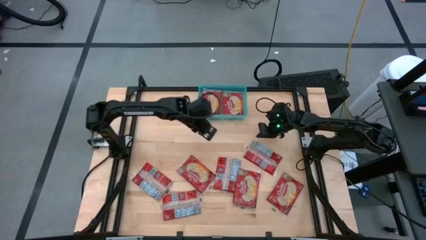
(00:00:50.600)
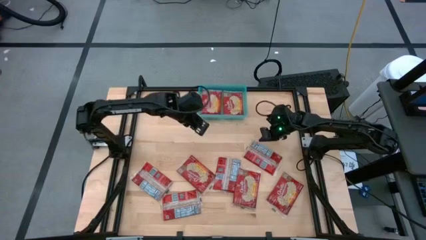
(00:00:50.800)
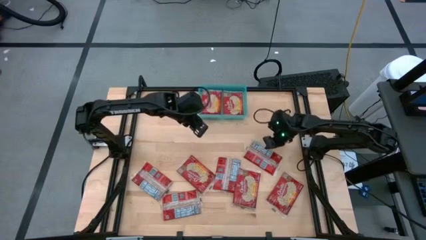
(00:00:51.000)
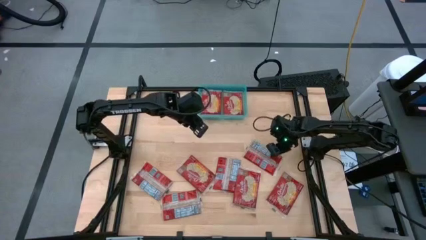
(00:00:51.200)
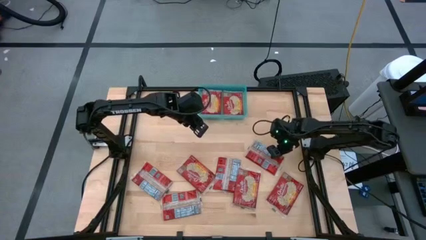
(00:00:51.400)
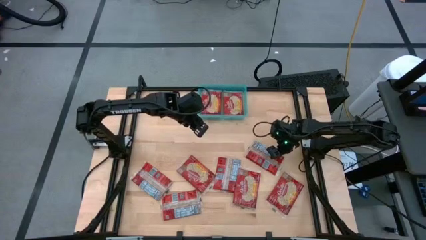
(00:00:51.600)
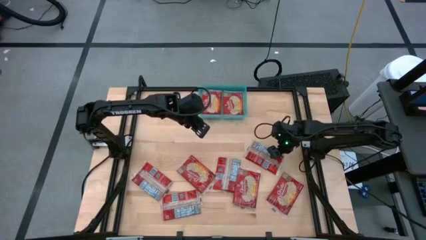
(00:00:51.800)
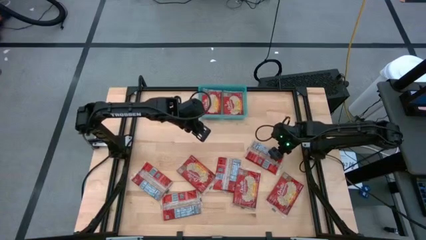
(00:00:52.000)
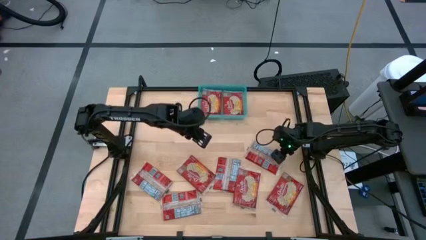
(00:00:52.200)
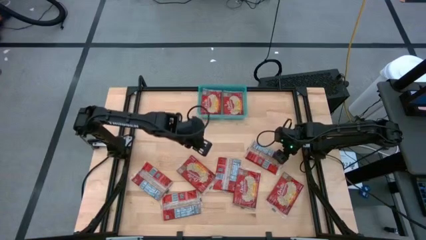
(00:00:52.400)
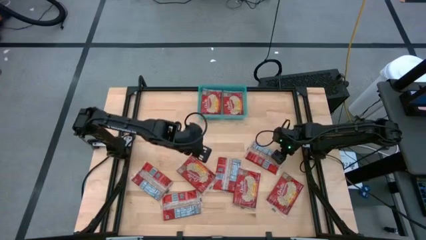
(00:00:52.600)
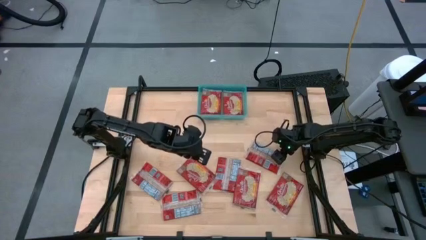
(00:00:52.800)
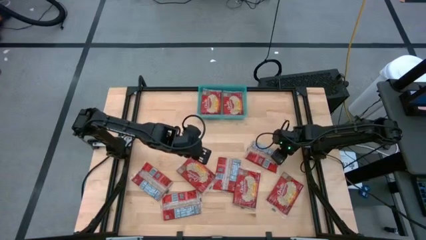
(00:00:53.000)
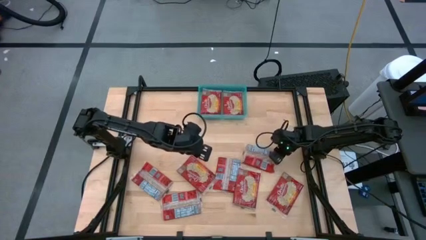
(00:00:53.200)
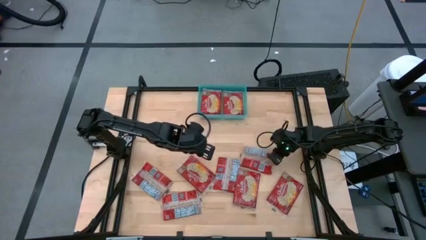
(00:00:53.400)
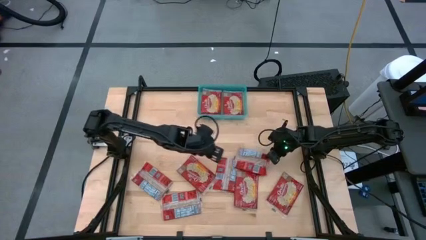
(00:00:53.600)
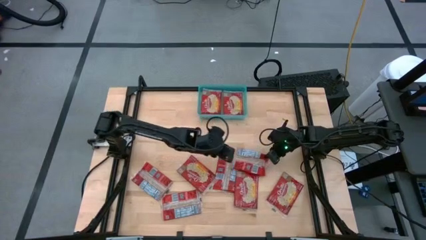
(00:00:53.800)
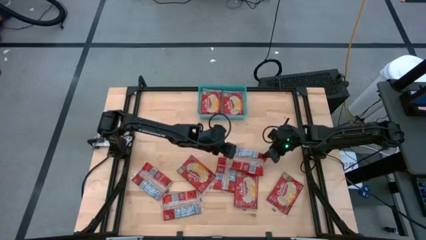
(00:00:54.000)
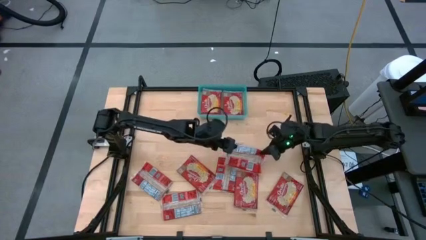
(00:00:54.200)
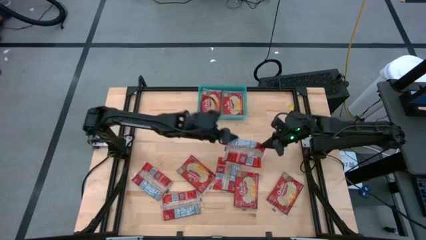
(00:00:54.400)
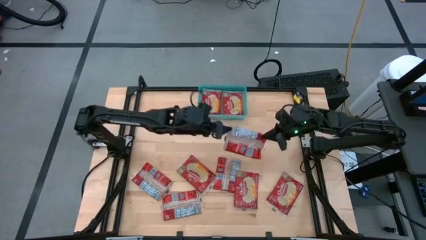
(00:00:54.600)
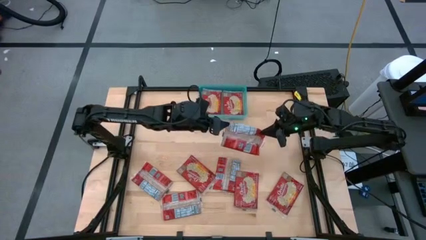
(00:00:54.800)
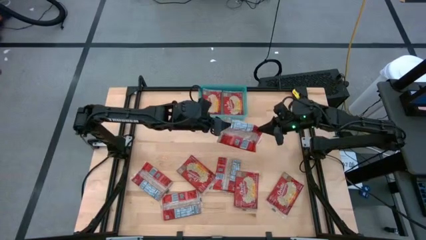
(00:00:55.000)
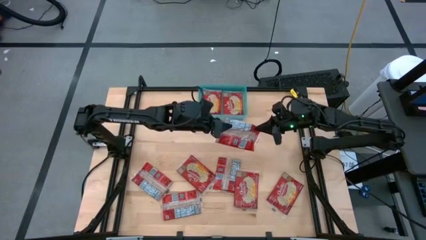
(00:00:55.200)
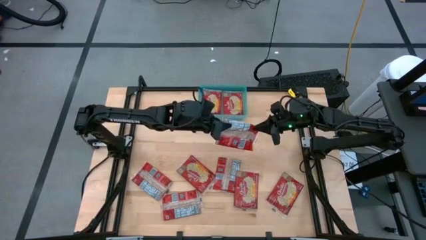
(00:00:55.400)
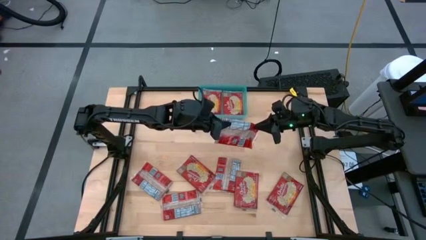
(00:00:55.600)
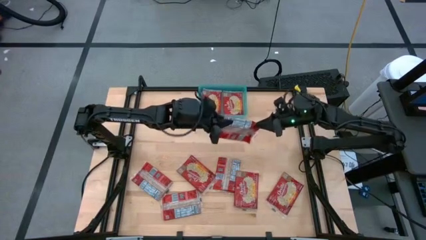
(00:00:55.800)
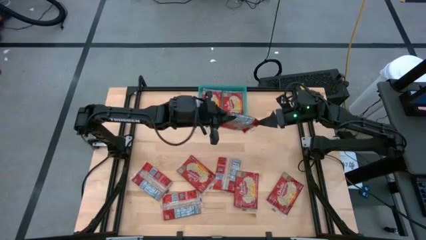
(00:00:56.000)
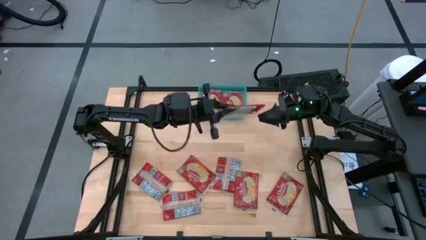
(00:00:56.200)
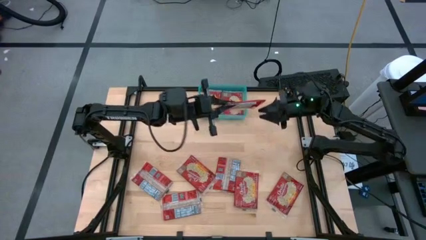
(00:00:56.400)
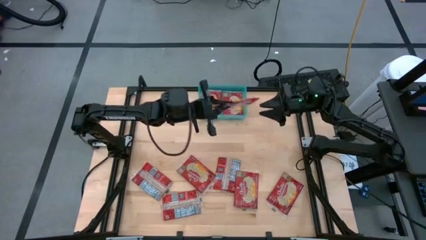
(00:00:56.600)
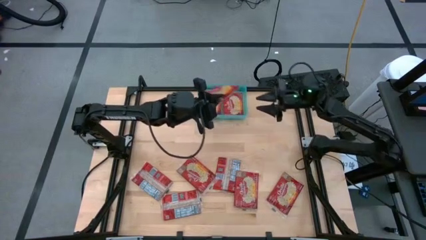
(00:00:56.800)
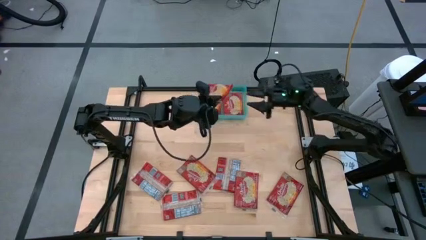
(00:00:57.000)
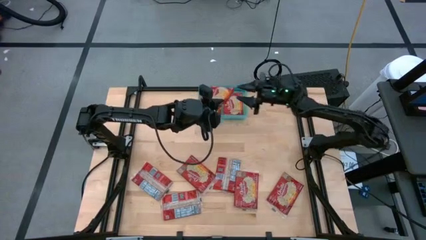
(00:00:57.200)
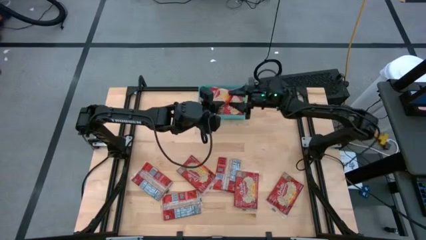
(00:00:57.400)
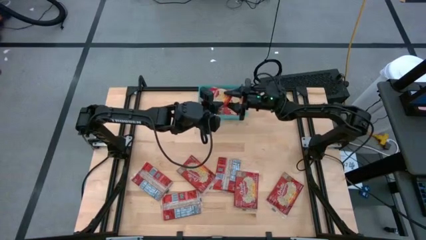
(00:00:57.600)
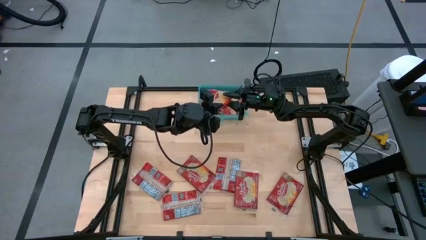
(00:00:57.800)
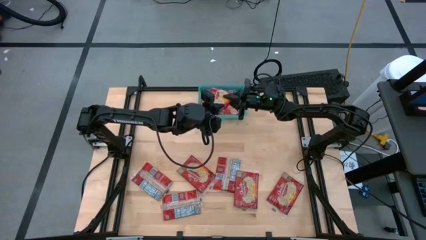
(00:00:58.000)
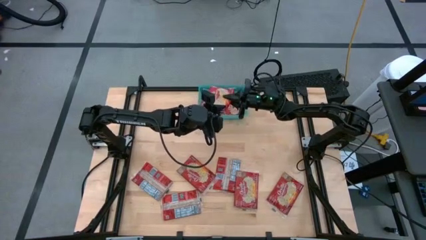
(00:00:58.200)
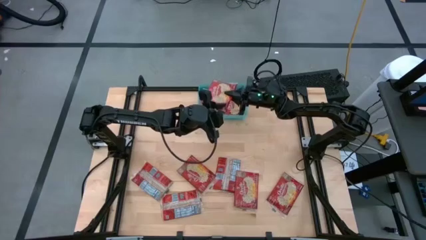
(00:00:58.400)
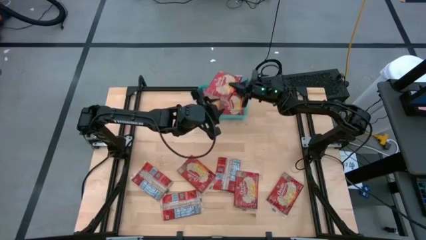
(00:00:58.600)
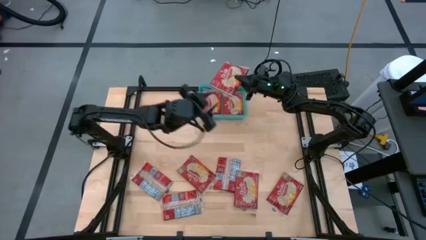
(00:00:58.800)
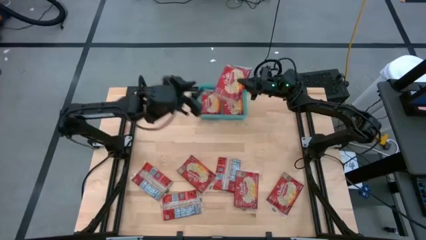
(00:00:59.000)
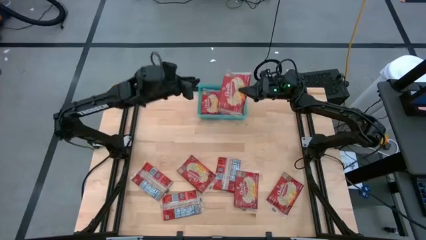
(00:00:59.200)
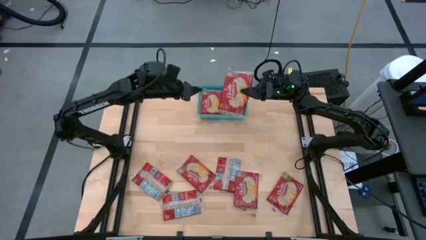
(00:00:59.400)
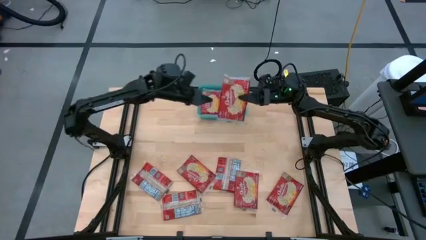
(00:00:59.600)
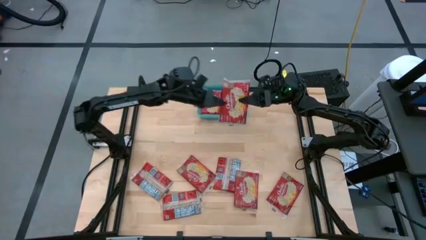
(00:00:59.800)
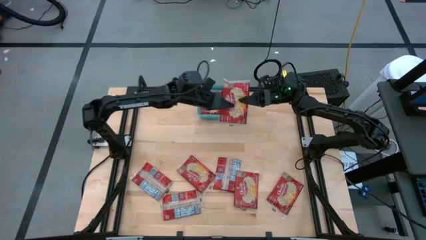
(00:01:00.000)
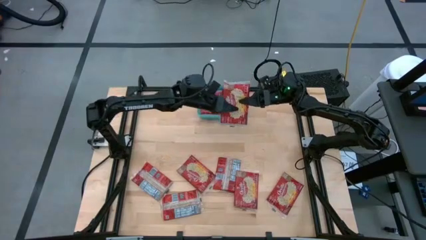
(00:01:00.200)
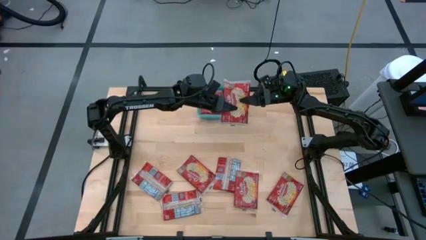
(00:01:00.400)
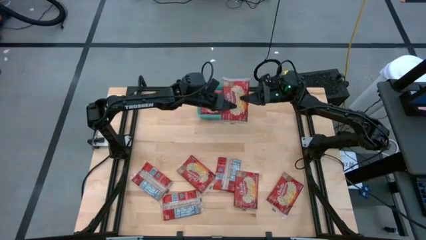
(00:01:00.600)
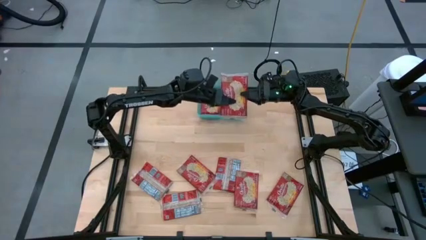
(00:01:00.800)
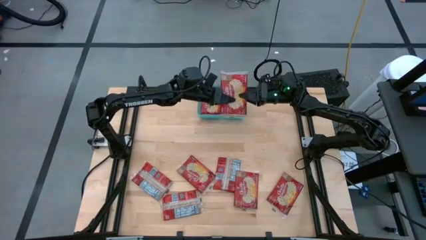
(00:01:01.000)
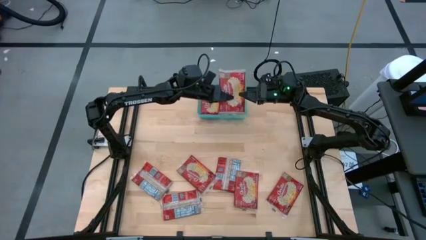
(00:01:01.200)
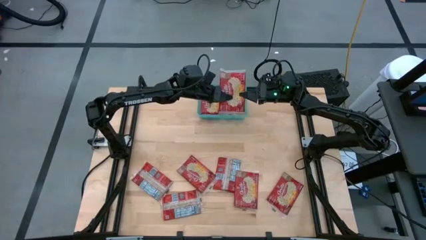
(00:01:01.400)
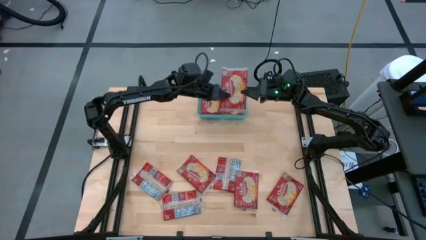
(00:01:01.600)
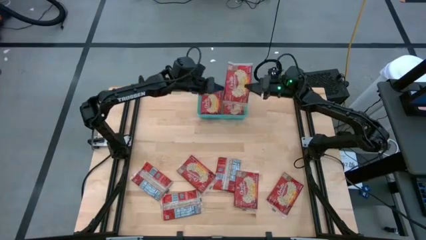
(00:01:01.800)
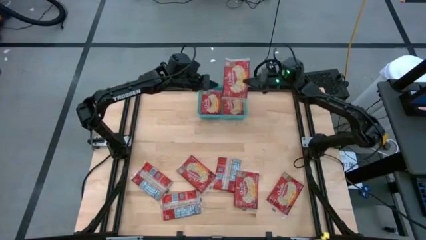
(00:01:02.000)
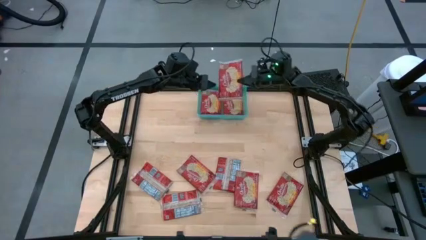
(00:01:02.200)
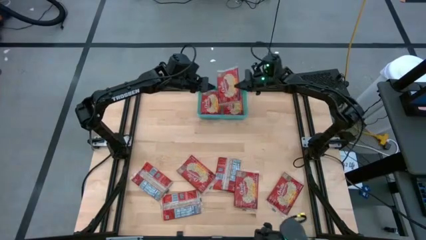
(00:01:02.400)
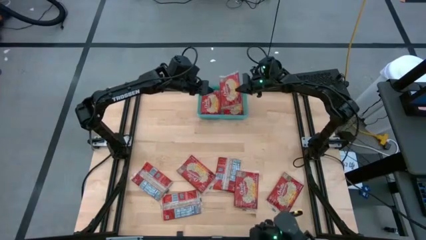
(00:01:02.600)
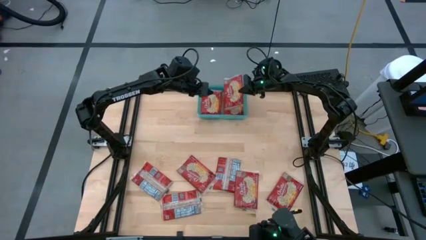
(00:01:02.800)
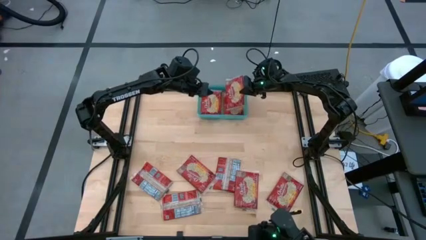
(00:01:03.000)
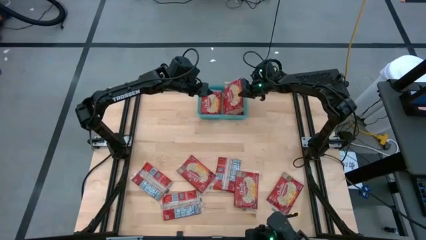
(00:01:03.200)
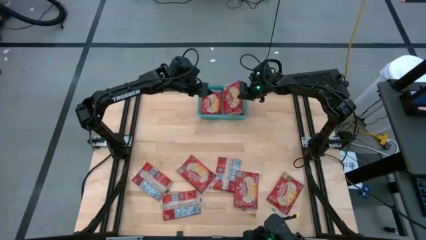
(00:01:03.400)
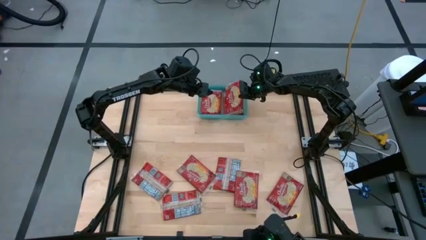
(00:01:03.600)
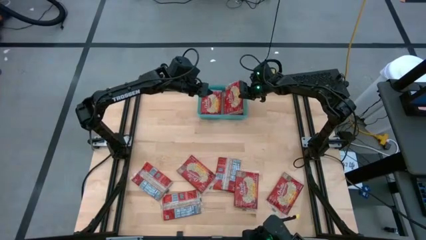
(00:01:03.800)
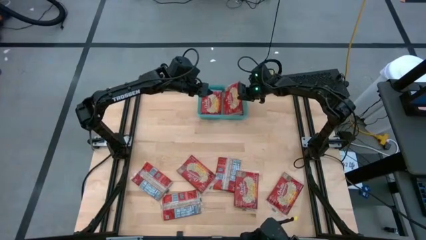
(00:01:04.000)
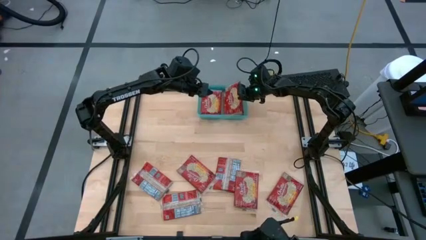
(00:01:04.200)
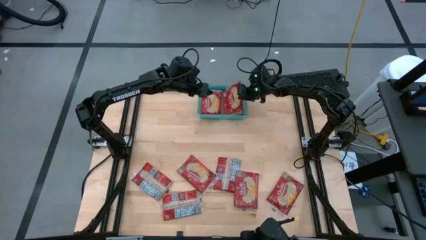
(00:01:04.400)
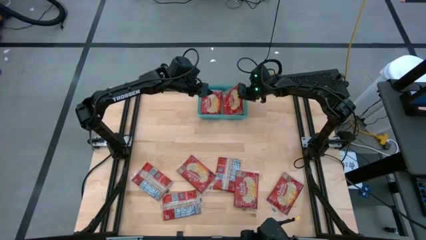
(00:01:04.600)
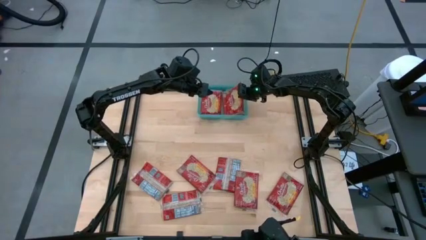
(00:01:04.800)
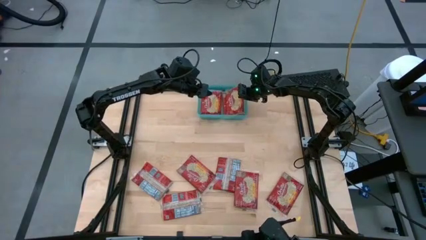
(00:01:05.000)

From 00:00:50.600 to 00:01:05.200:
Task: Sort popcorn bags into baskets
Put the red popcorn bag into the blue bin
